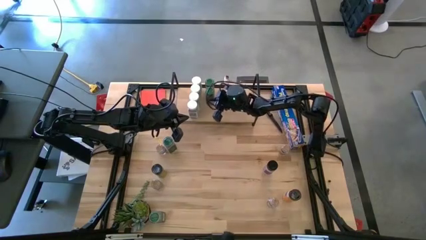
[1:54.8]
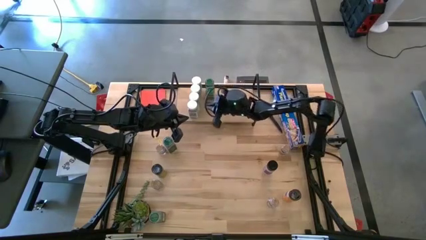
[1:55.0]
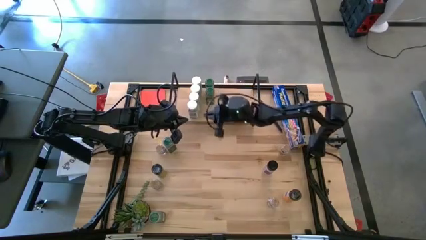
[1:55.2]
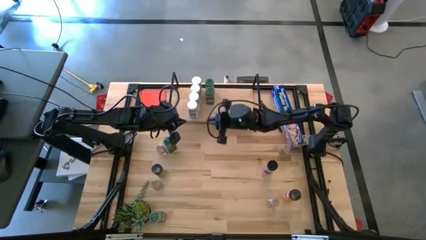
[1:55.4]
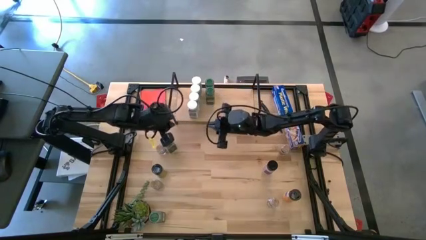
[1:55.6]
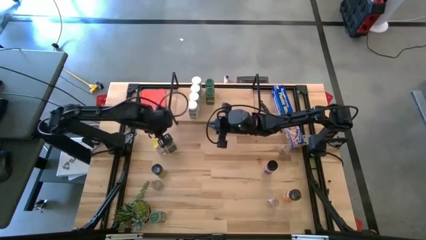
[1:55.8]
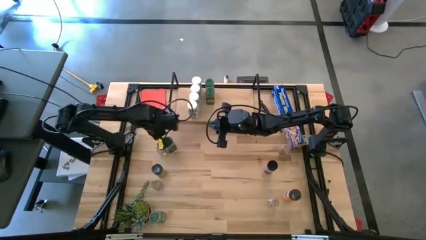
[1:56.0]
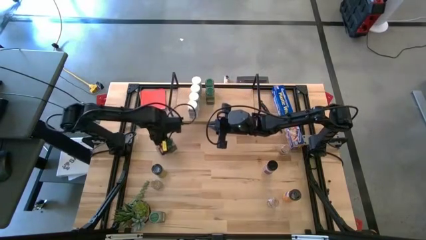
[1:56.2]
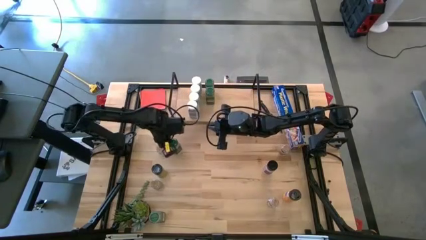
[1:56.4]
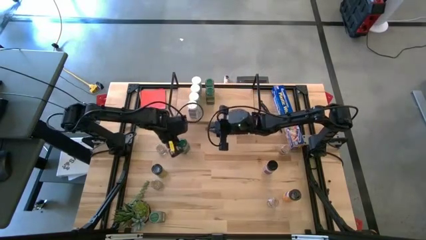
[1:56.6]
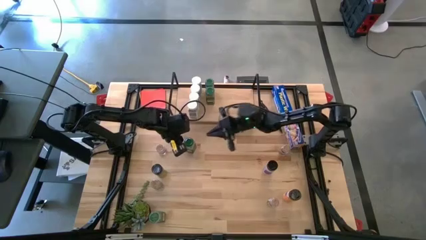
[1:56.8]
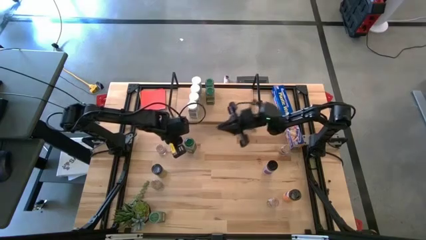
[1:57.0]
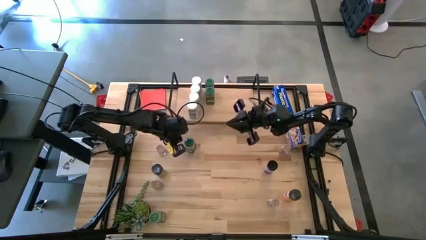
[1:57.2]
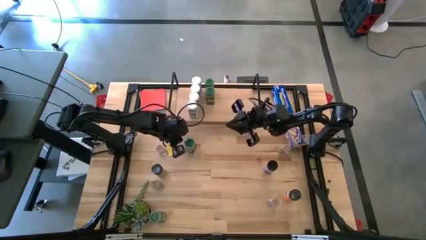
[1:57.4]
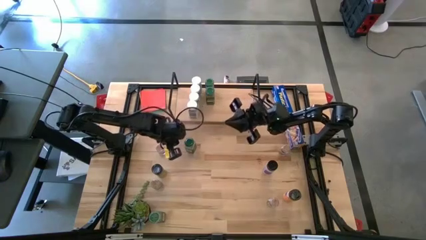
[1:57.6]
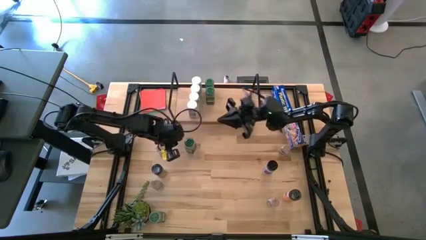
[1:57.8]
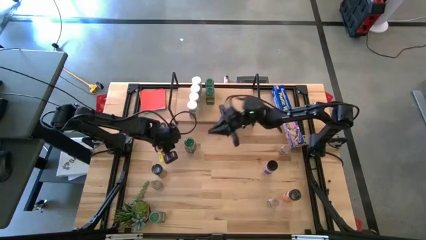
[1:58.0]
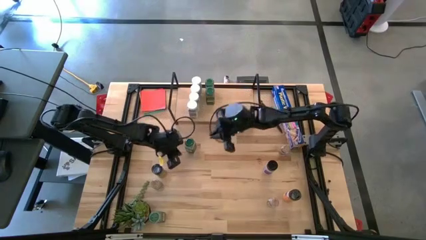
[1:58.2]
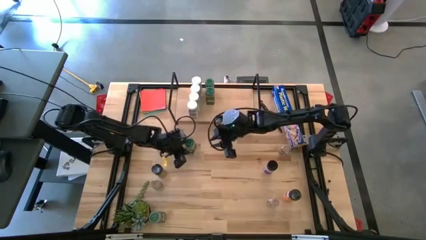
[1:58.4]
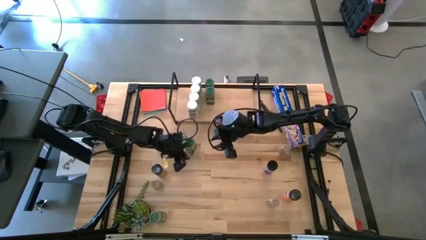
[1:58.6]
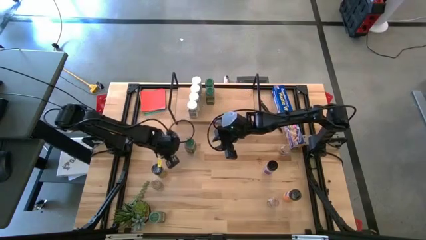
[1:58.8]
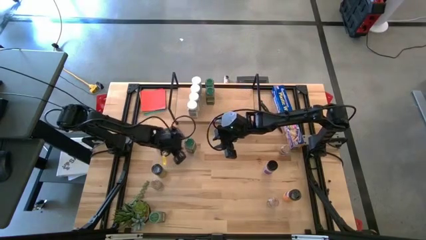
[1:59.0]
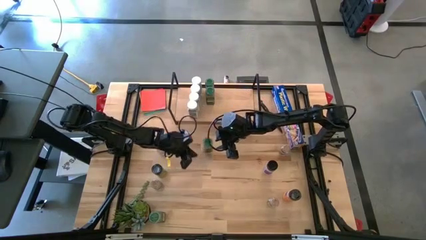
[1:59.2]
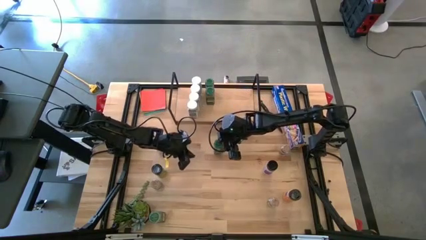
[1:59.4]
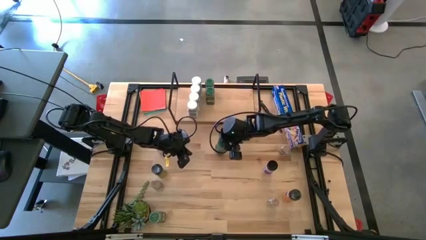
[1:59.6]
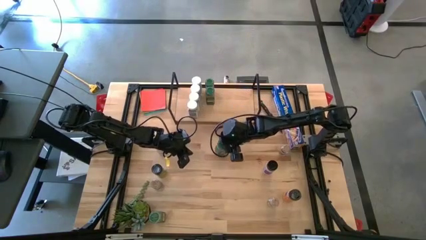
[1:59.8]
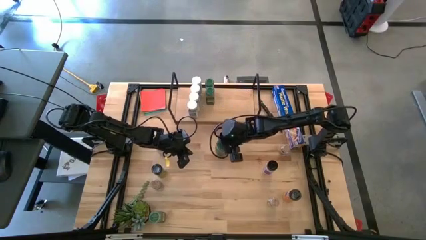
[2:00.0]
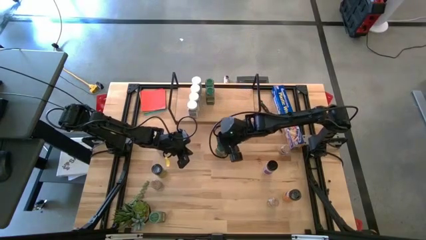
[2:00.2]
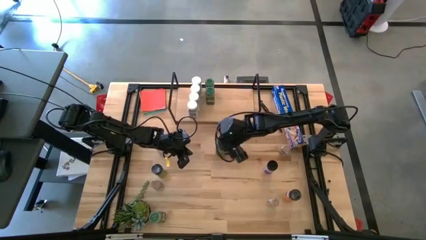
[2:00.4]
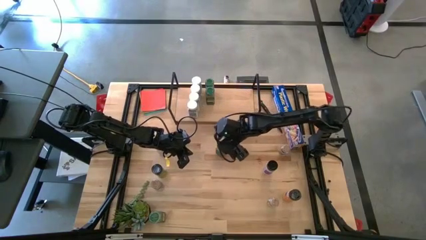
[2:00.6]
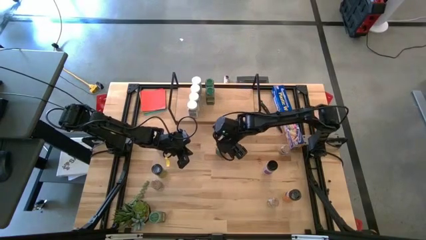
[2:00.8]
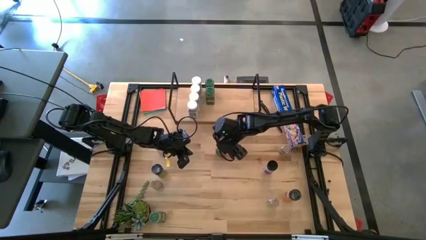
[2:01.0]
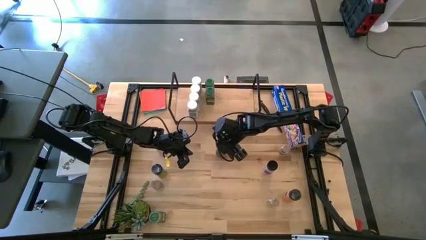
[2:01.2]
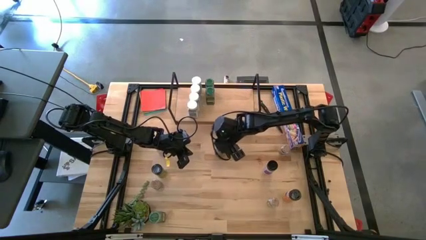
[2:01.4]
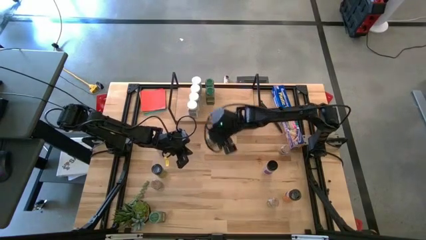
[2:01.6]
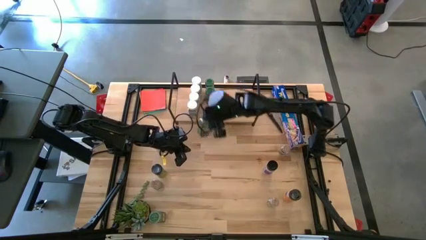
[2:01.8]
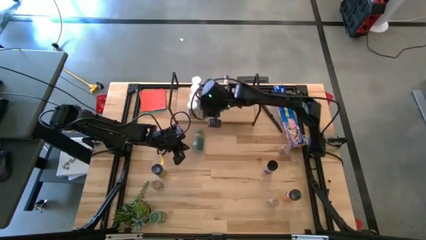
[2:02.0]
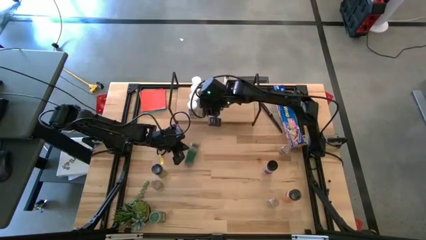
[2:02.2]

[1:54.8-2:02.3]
Task: Shelf spices
Put the top green seasoning bottle on the shelf aligned with the other green seasoning bottle

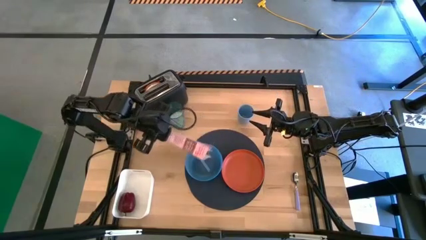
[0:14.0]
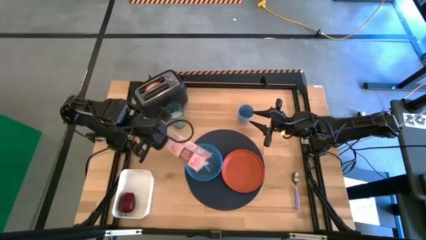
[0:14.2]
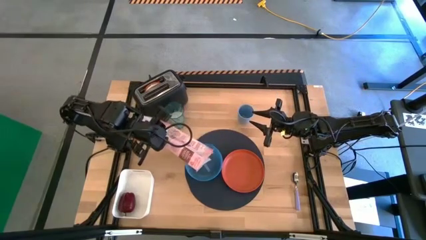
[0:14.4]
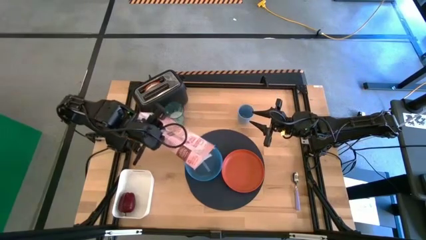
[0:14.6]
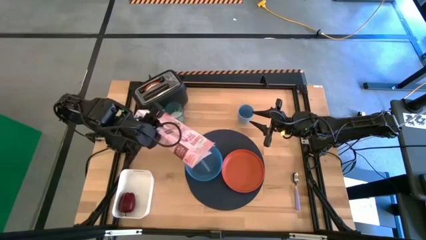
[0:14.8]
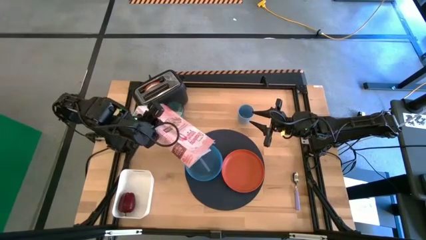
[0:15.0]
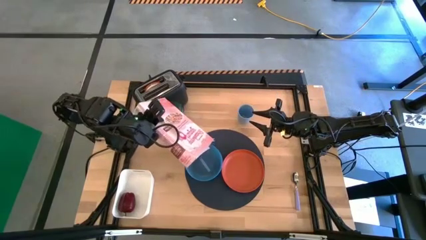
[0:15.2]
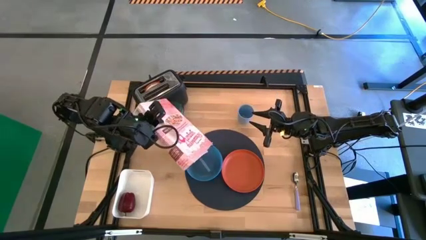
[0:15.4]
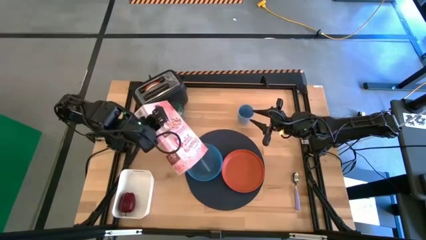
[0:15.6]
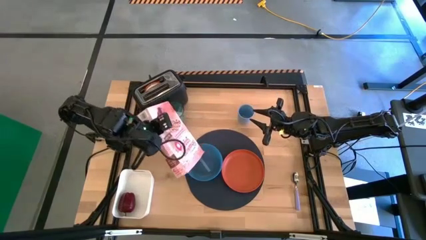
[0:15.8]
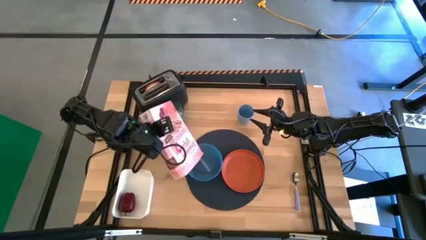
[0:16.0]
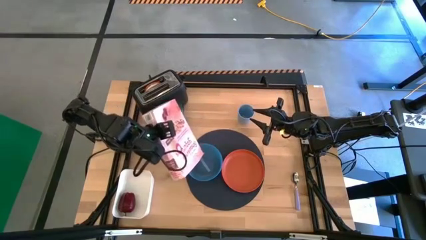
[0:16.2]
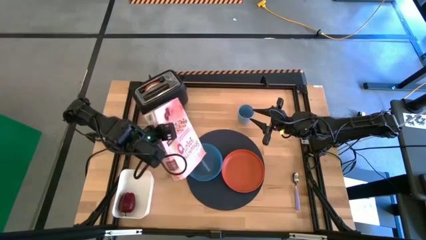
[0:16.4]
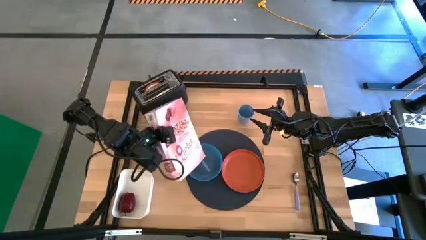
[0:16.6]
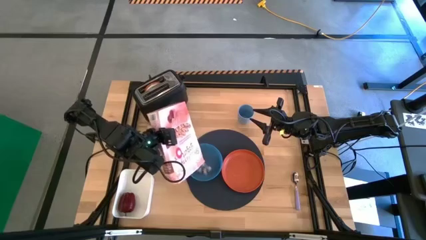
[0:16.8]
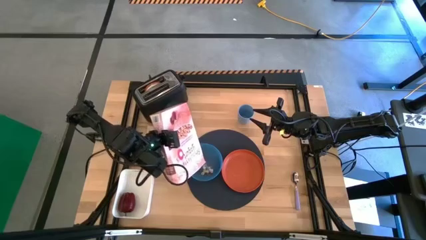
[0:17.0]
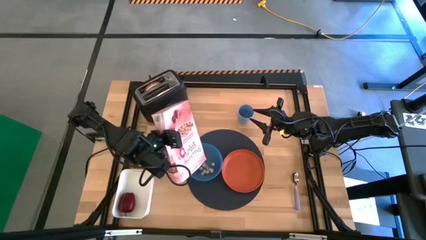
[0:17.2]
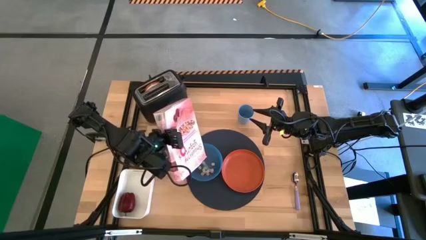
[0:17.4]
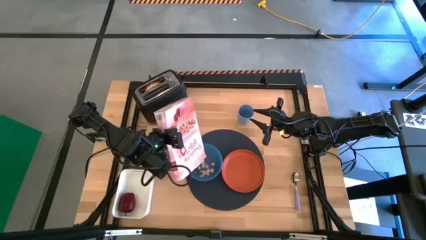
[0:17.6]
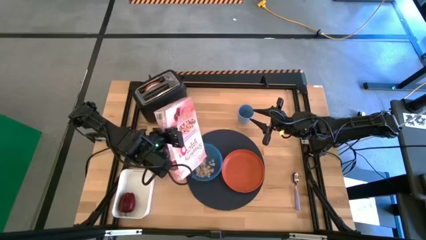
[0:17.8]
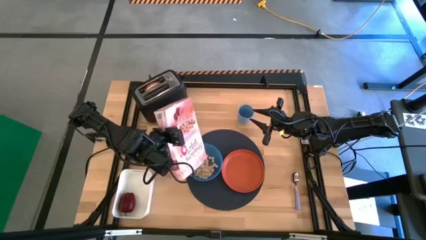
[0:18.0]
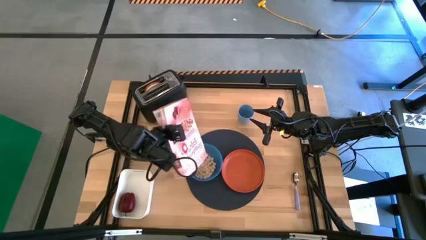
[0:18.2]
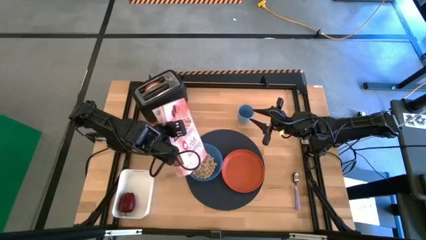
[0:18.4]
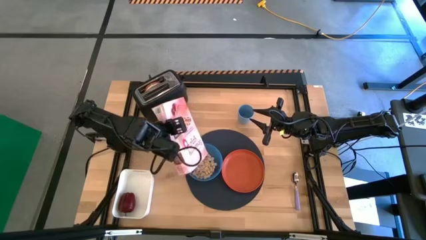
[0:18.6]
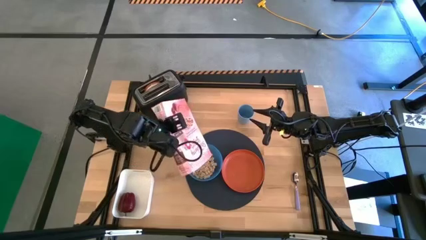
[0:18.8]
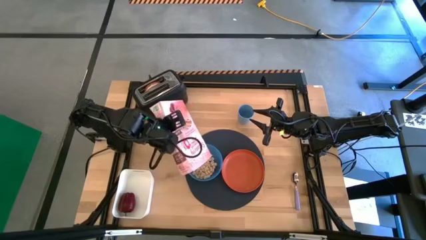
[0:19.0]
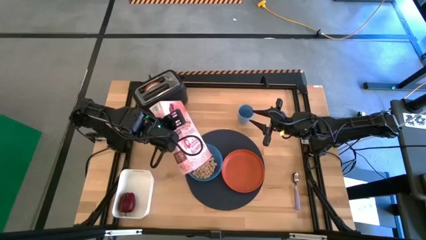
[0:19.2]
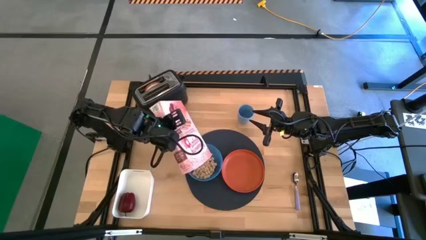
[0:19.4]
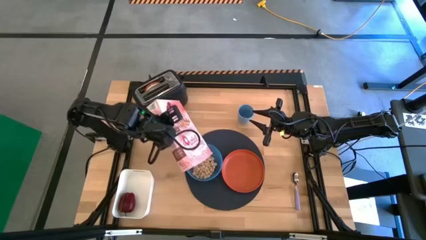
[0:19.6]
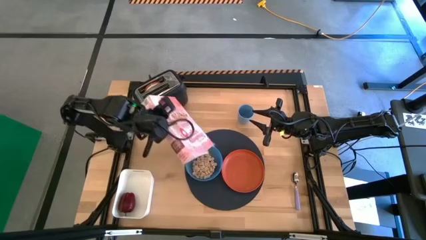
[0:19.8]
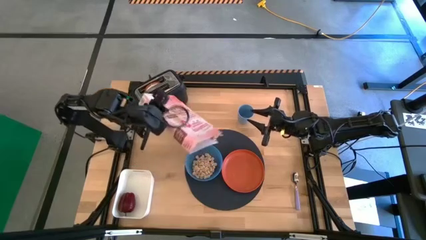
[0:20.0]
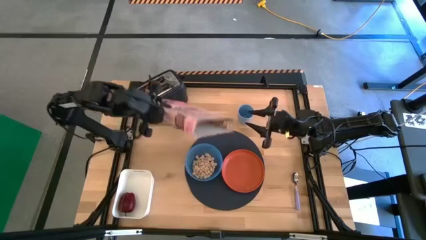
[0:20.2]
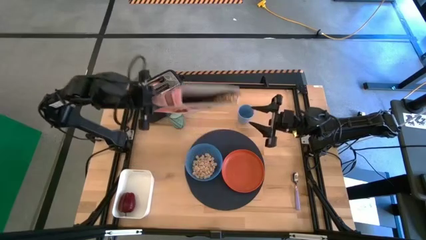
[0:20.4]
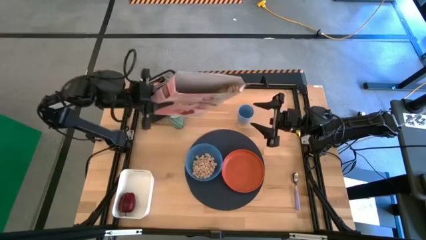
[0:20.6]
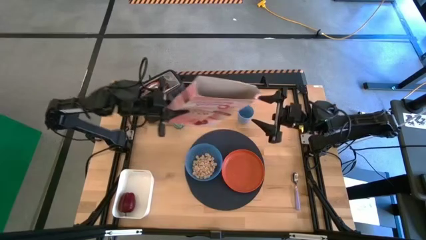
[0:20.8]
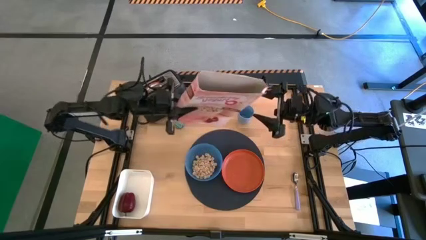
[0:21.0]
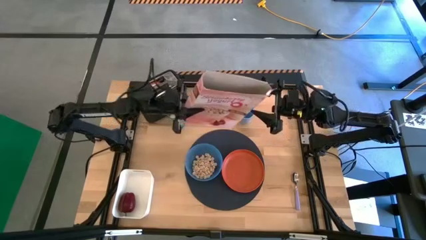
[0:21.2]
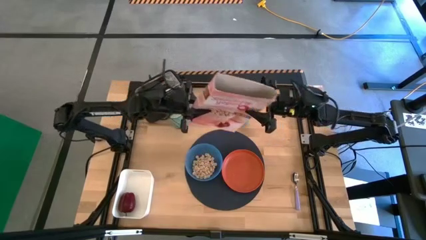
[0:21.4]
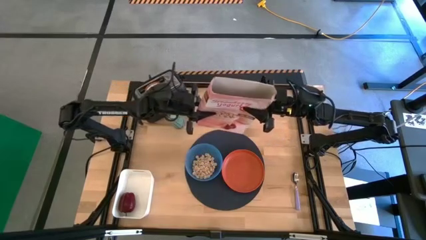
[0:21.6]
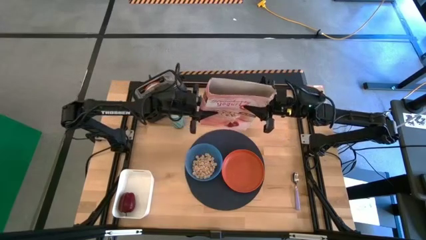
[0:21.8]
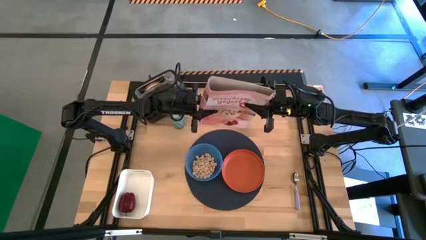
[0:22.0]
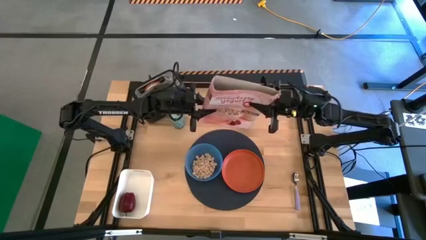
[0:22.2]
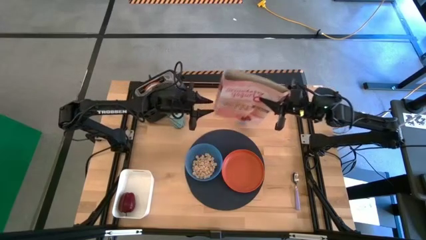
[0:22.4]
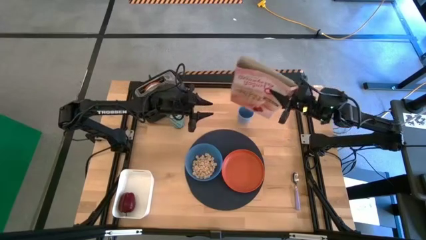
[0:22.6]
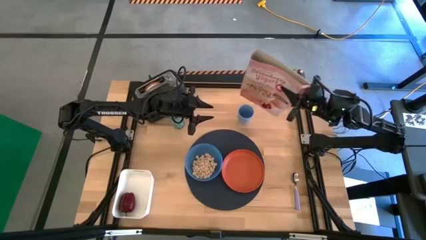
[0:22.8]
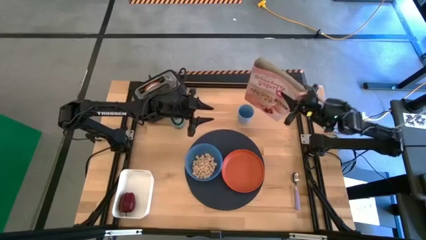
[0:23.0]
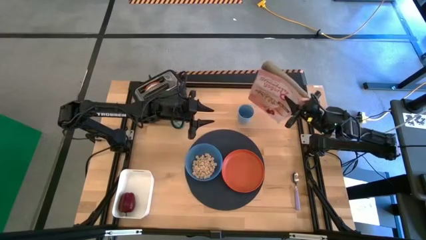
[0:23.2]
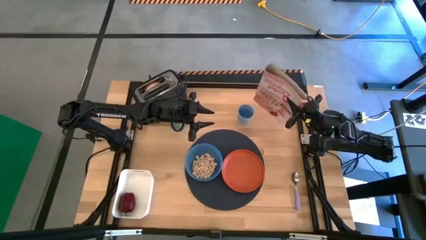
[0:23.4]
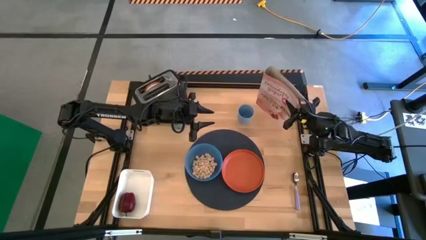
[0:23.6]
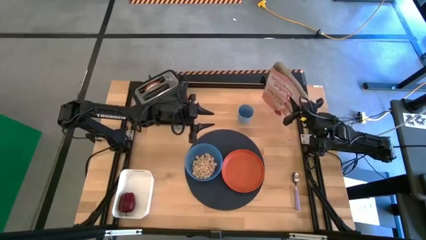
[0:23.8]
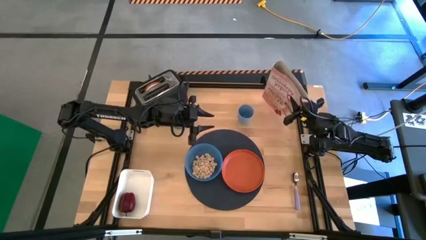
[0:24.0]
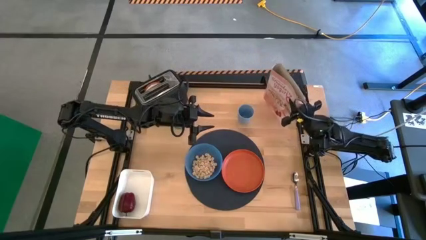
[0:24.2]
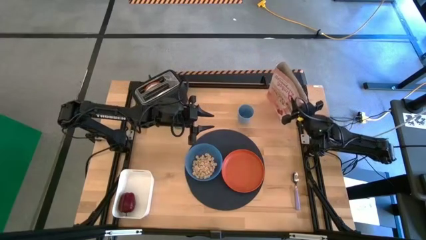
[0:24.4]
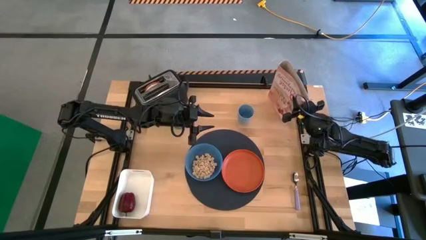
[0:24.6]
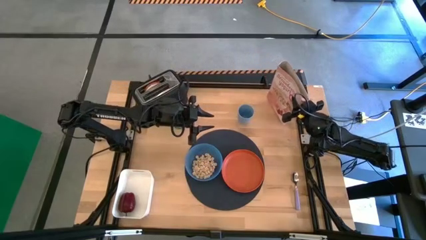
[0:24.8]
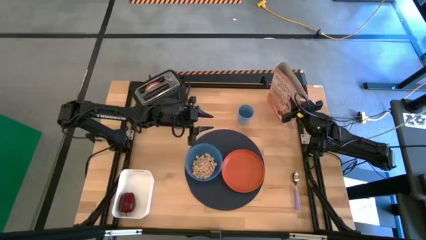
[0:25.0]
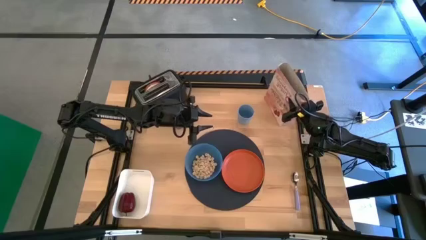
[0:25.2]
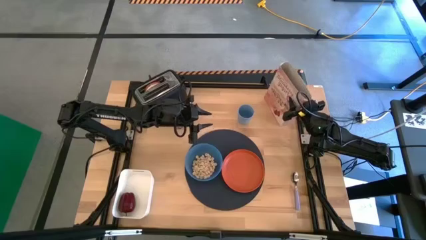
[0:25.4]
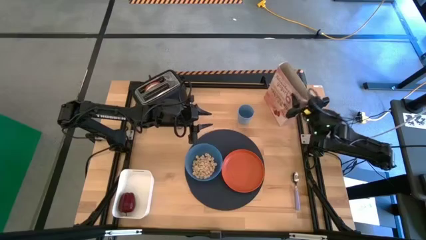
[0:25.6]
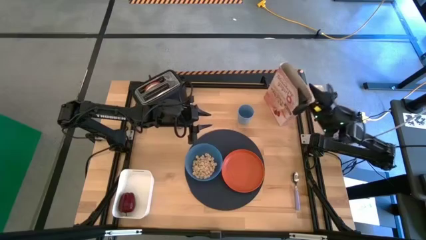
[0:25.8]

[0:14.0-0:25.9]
Task: Arrange a breakfast setting
Pour the cereal from the cereal box into the bowl
